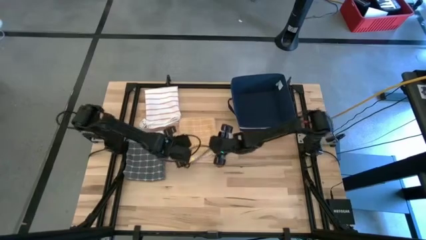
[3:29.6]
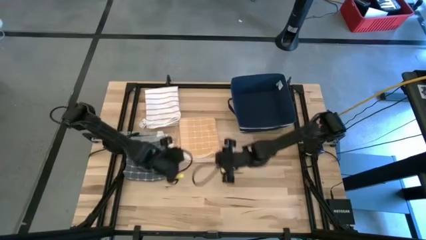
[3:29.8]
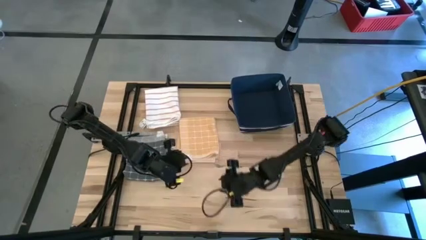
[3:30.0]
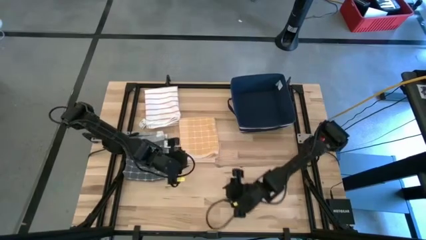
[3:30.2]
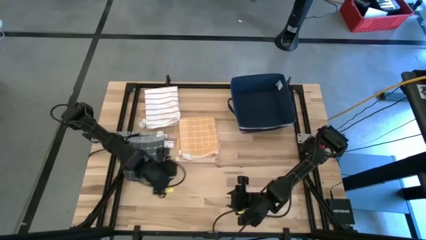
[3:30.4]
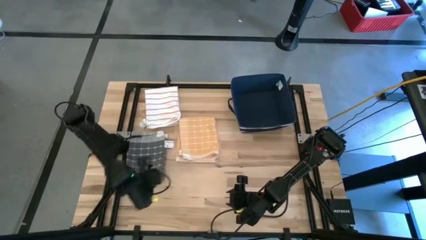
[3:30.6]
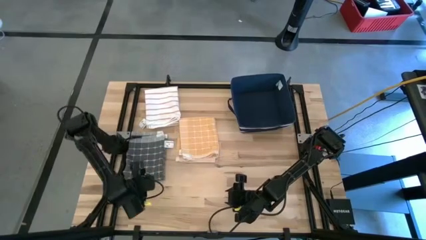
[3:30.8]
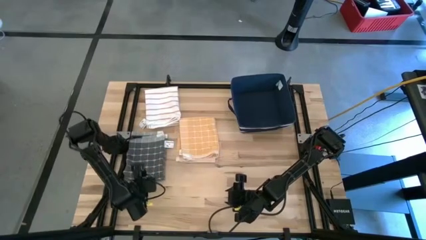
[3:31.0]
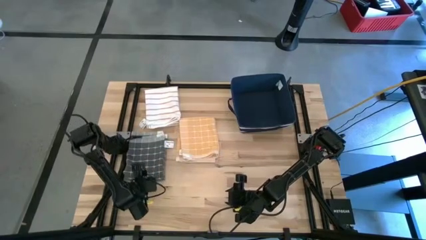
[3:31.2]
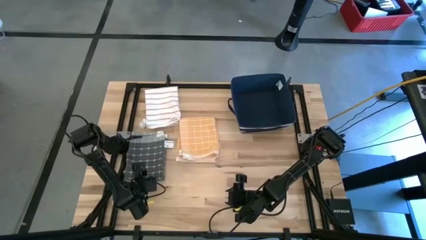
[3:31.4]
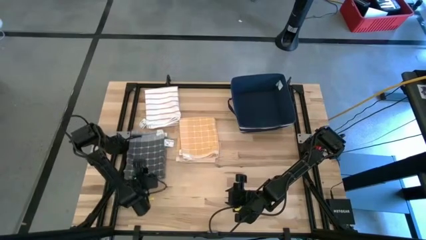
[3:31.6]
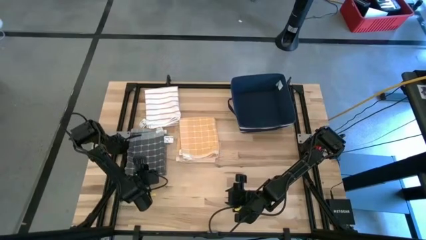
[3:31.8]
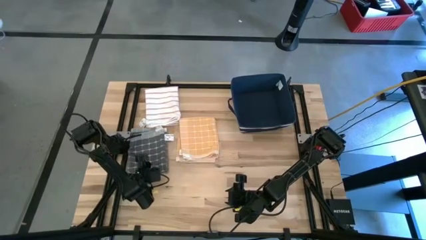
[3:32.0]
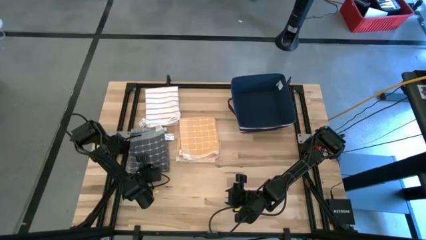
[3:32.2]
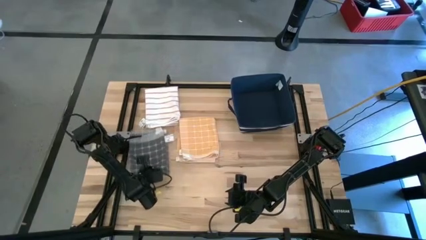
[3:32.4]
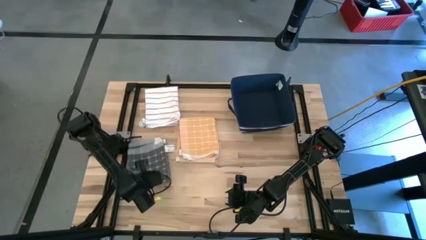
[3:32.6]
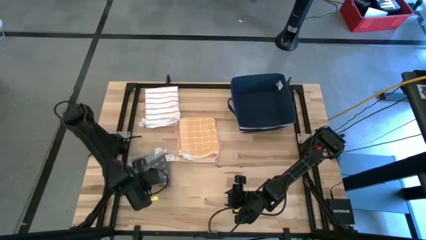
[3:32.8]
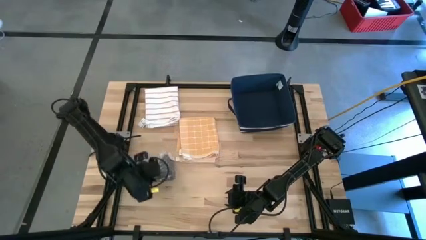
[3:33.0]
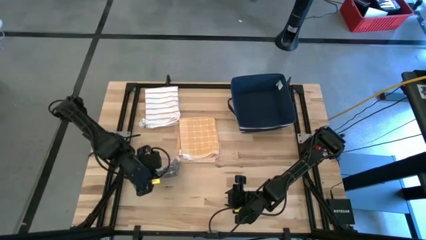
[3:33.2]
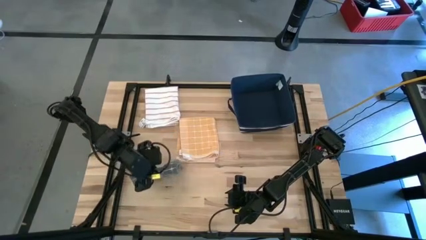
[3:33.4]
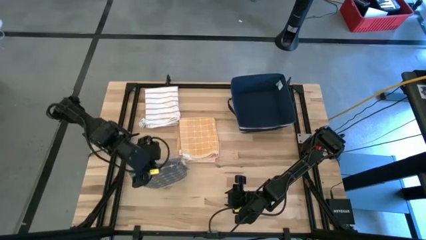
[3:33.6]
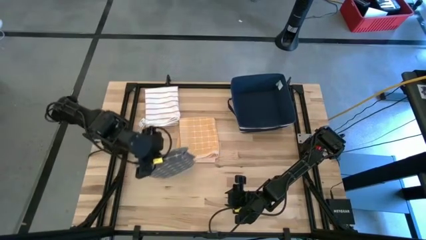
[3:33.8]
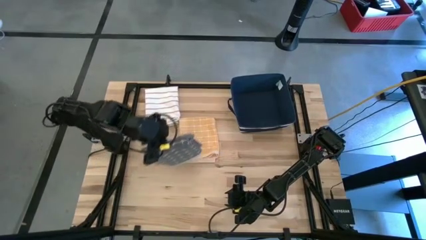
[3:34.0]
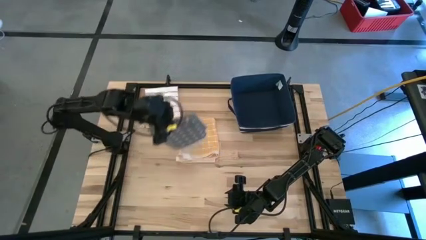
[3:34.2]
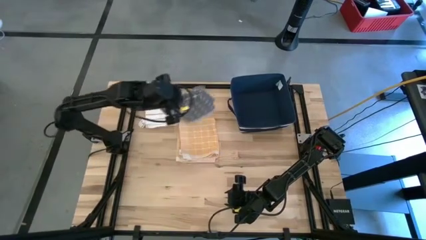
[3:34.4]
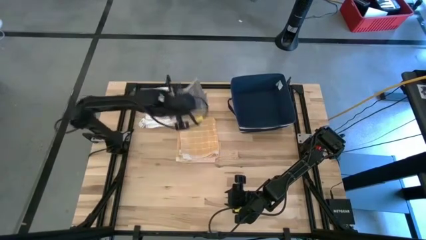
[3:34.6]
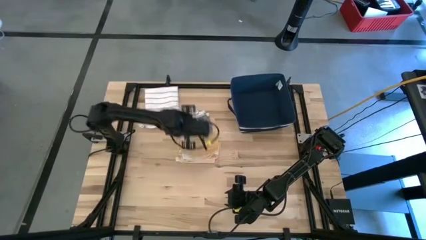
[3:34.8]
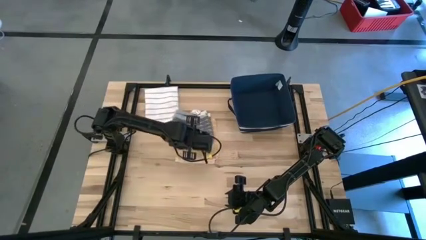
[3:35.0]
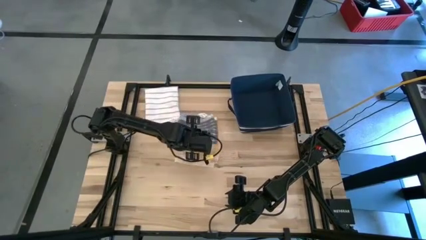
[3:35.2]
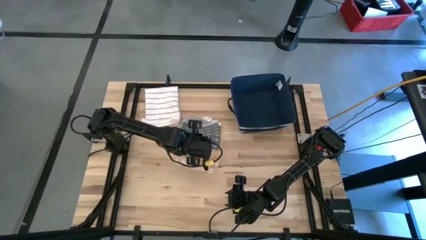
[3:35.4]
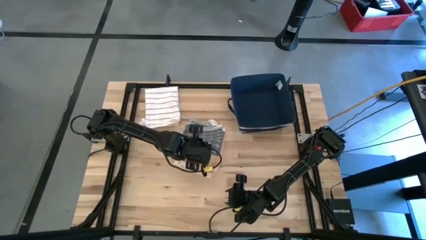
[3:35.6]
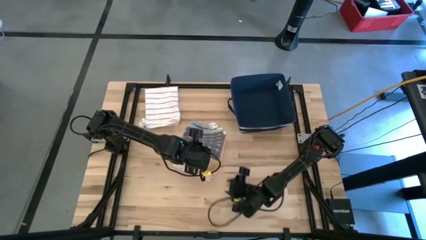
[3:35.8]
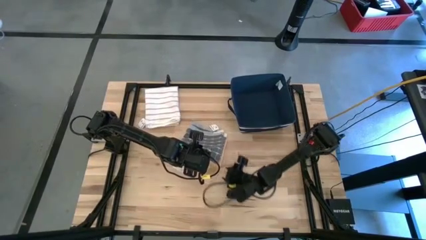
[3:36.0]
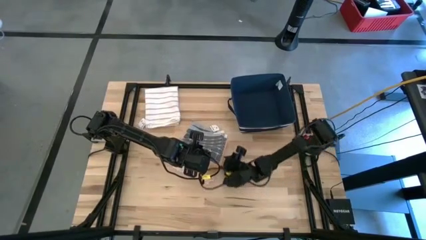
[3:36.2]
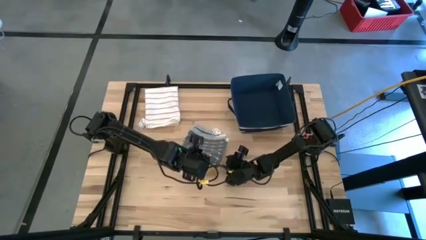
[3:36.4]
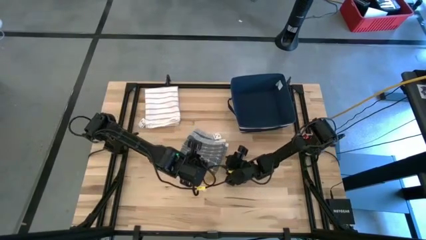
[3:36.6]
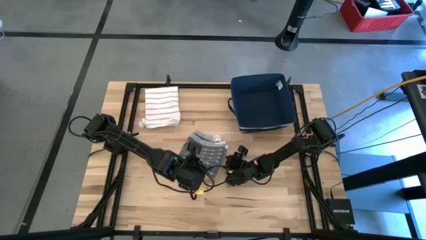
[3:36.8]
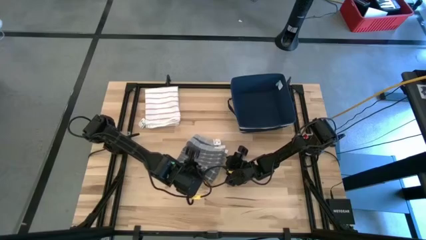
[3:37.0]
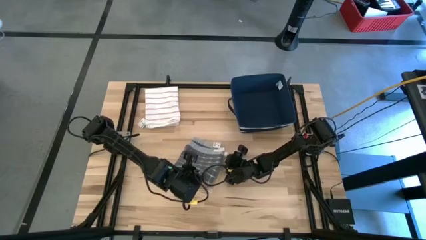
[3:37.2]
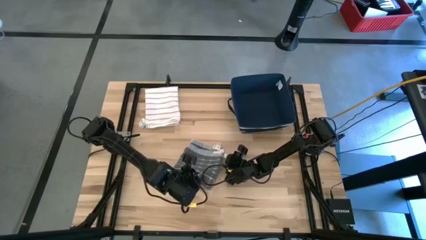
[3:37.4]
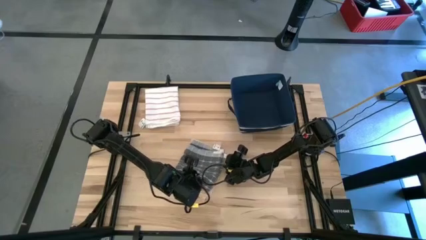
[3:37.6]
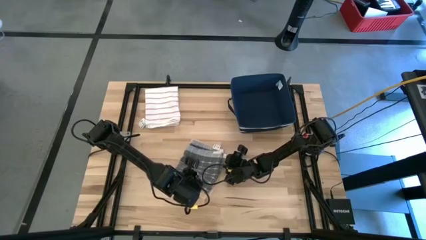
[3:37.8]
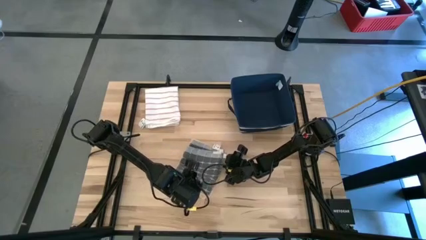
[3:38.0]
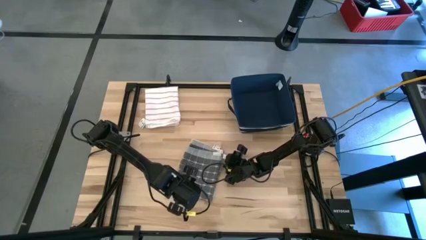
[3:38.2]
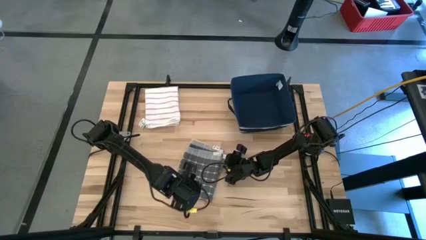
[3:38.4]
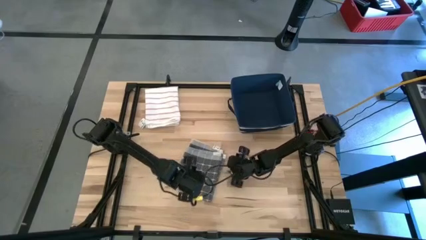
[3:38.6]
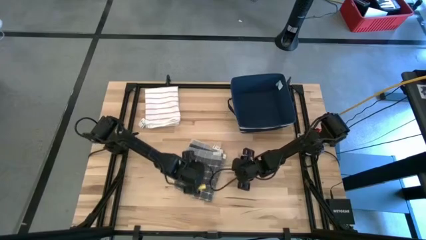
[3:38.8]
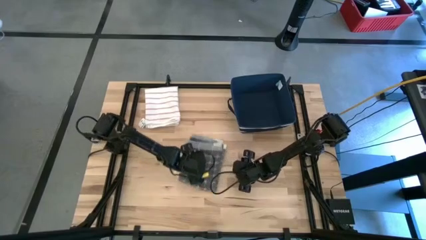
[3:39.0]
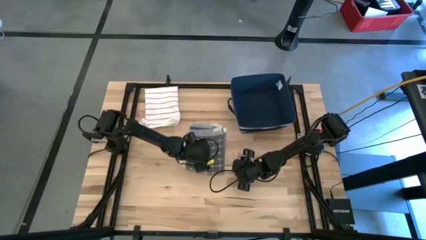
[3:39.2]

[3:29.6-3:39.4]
Task: Fold towel
Stack the black towel on top of the orange towel

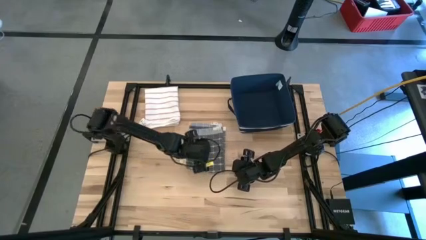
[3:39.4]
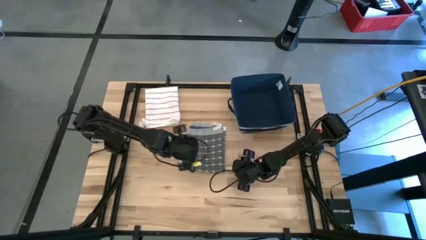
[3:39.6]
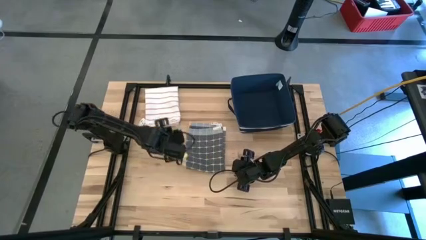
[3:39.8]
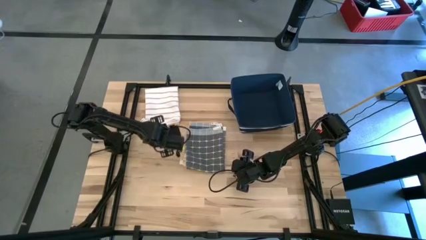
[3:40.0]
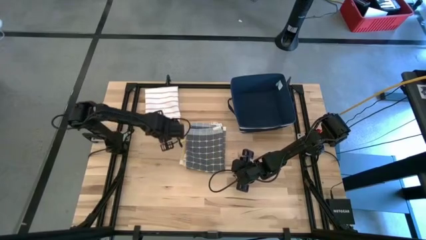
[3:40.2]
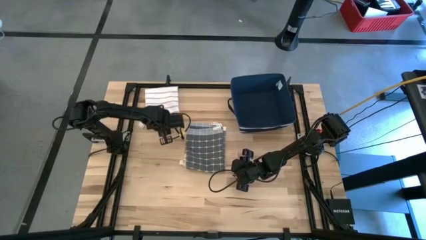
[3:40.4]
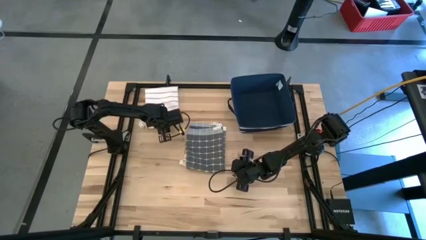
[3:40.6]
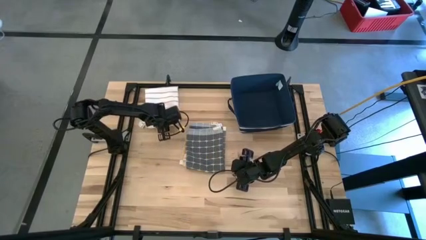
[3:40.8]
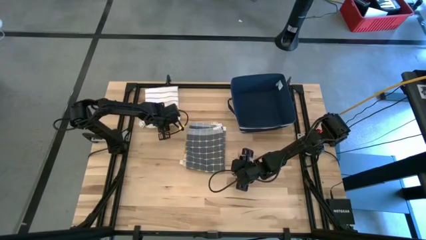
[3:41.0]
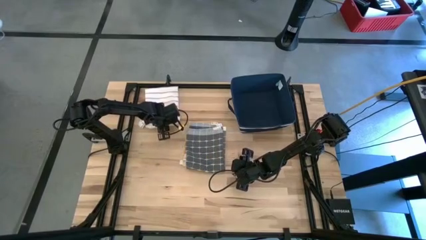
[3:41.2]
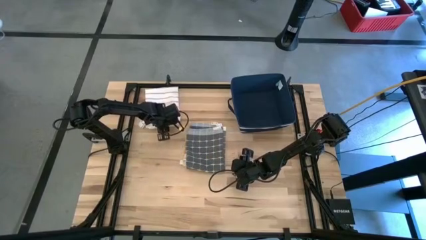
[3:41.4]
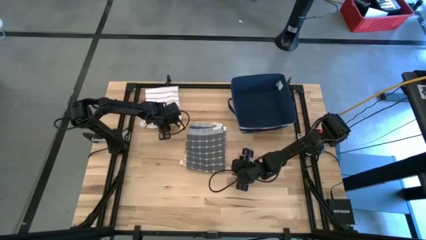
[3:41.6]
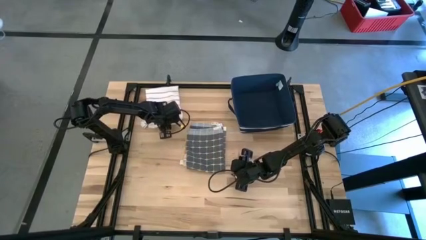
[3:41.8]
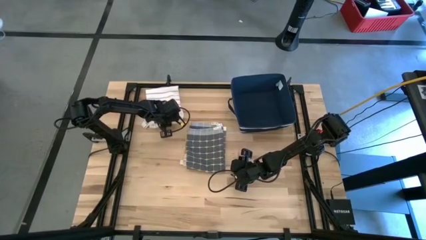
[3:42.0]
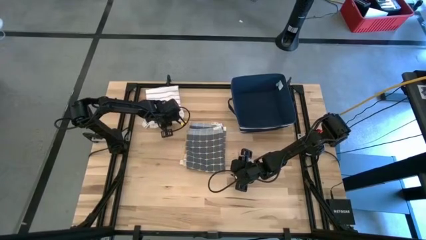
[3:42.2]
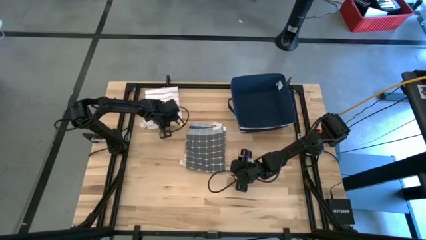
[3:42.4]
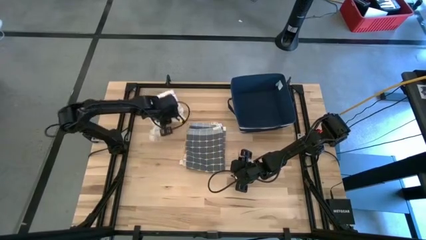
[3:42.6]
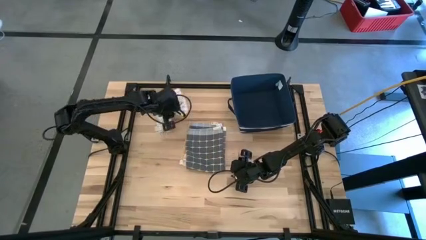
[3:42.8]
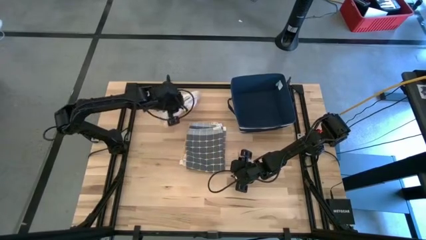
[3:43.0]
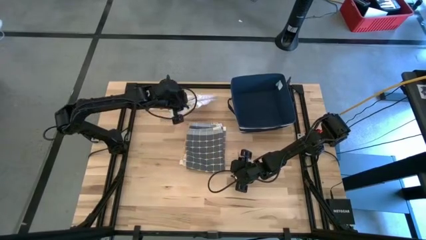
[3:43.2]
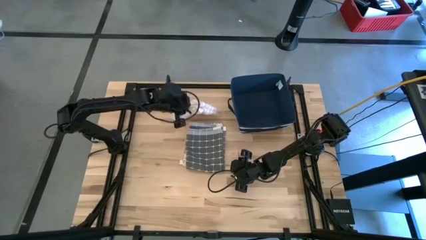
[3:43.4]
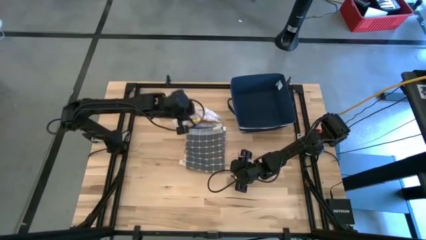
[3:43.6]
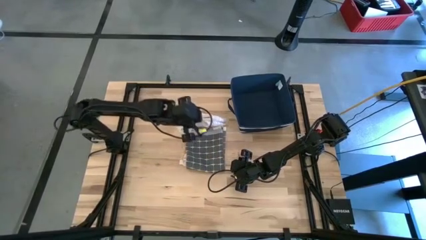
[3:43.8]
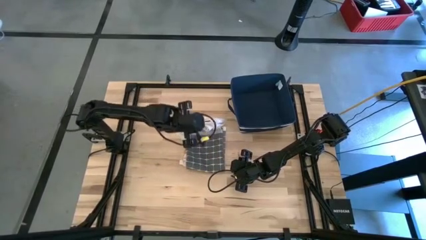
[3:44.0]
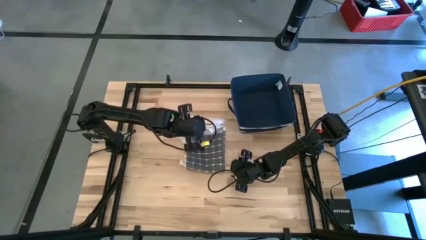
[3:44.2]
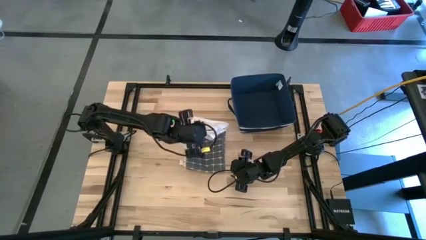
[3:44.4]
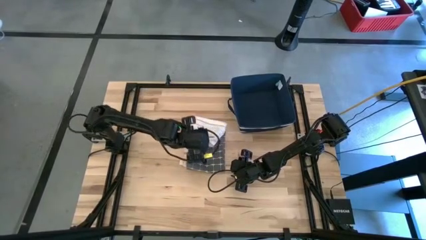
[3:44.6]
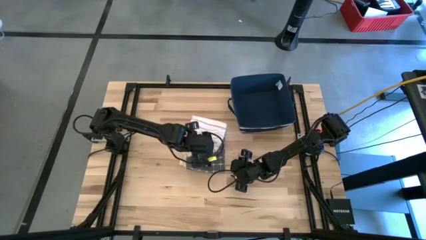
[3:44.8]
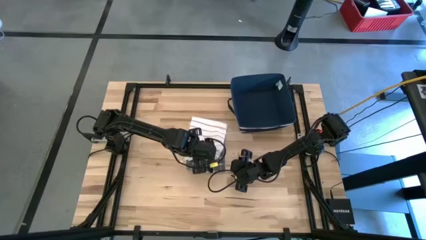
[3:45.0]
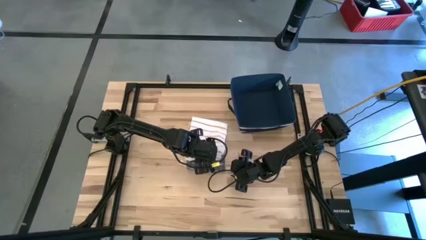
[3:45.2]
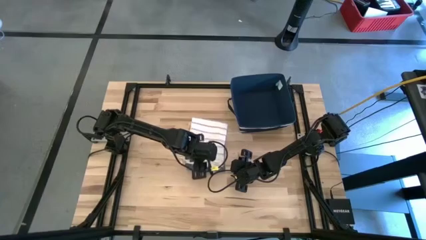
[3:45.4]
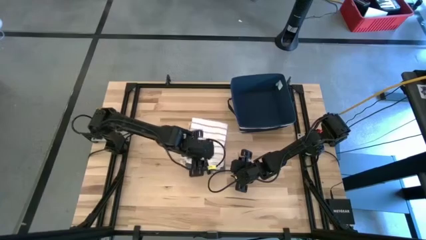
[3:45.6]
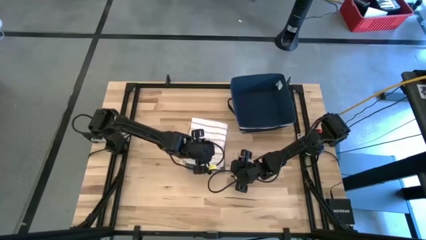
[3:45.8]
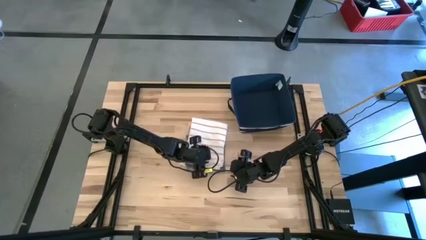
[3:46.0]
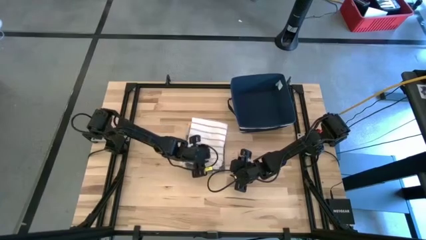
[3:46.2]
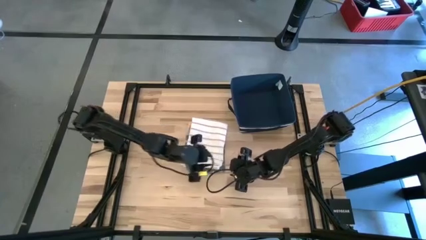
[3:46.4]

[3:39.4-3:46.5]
Stack the white towel on top of the black towel
